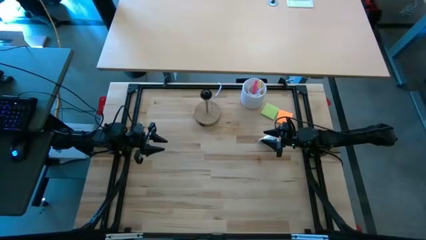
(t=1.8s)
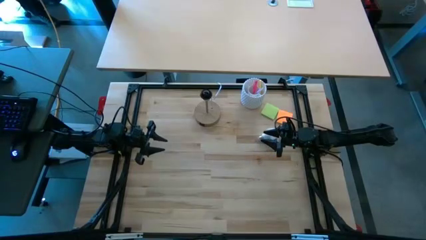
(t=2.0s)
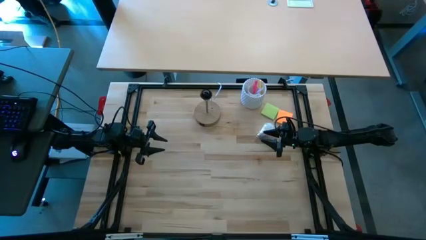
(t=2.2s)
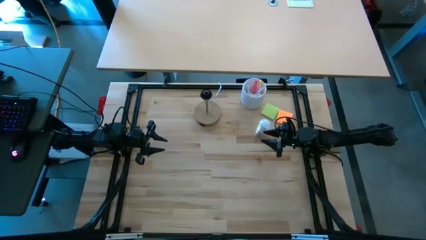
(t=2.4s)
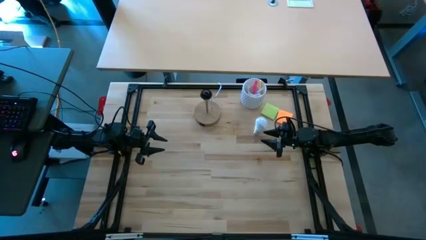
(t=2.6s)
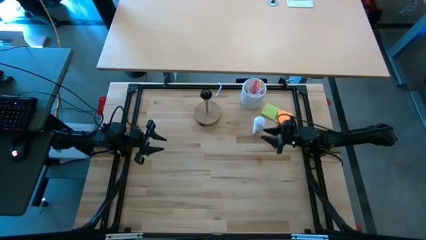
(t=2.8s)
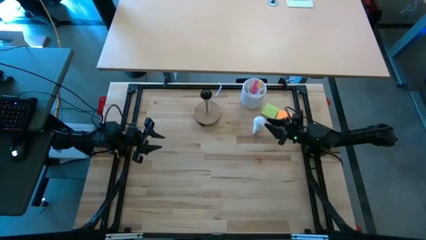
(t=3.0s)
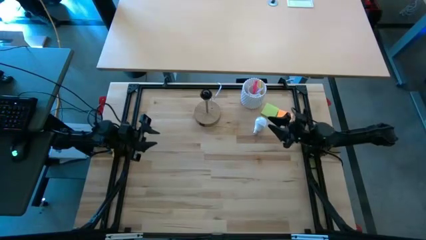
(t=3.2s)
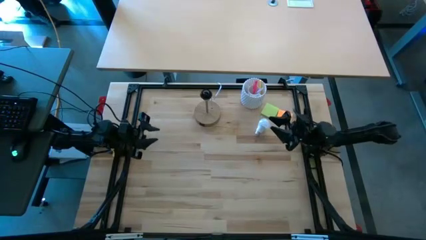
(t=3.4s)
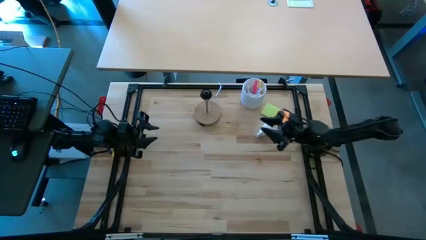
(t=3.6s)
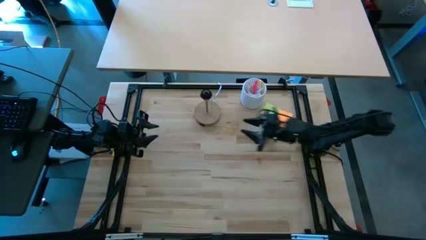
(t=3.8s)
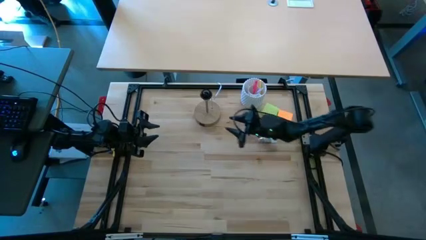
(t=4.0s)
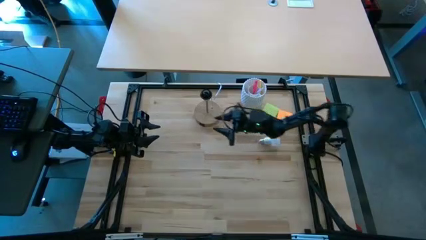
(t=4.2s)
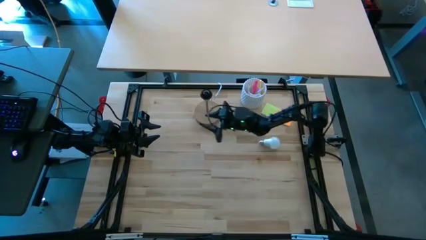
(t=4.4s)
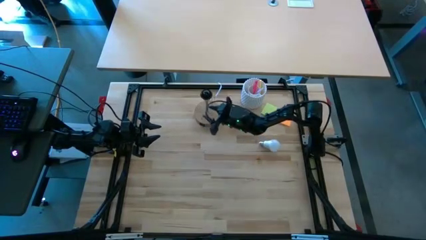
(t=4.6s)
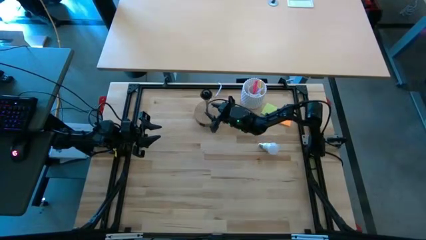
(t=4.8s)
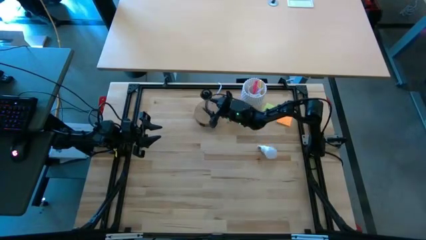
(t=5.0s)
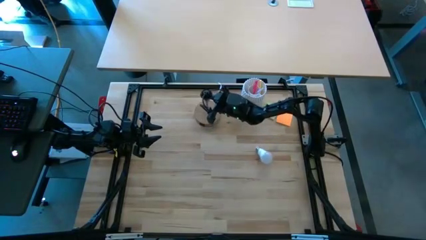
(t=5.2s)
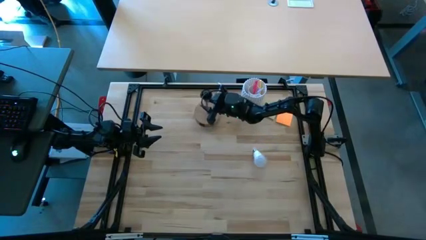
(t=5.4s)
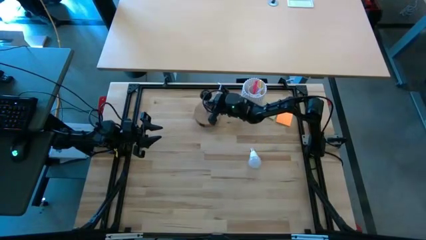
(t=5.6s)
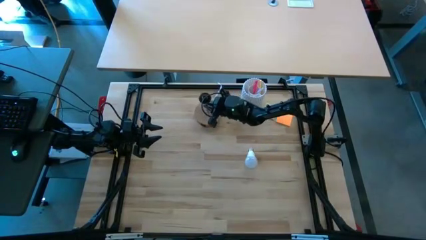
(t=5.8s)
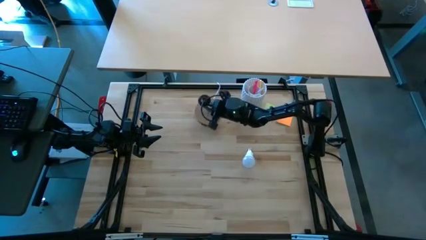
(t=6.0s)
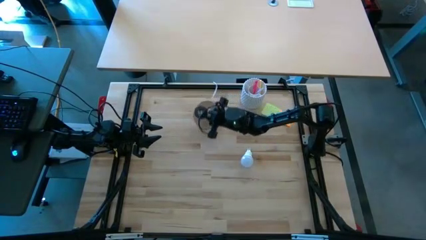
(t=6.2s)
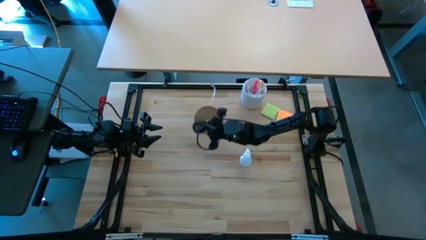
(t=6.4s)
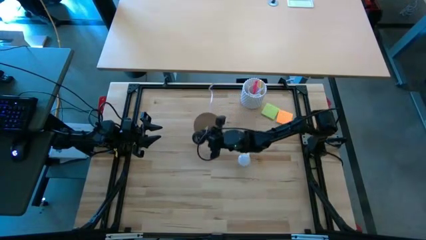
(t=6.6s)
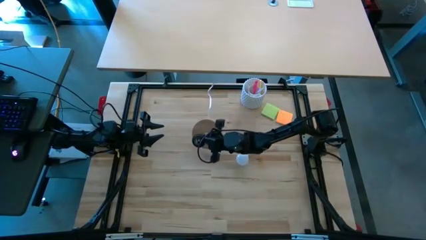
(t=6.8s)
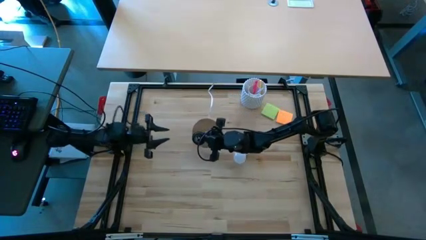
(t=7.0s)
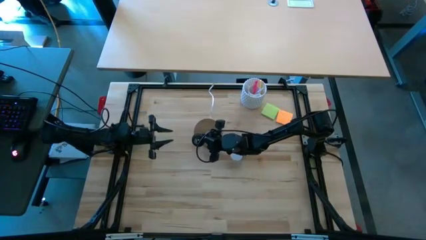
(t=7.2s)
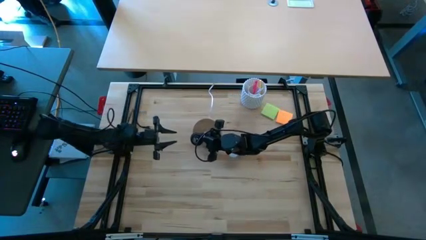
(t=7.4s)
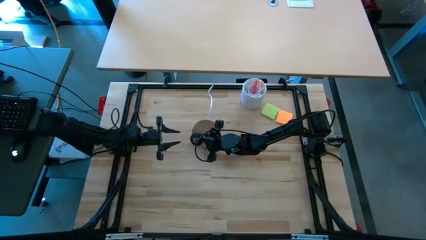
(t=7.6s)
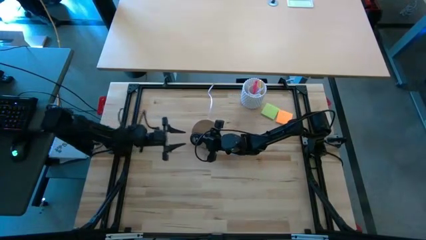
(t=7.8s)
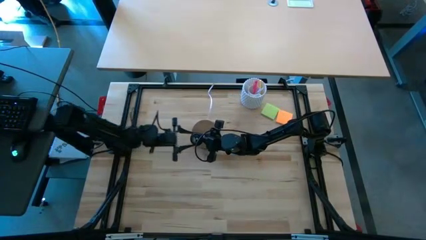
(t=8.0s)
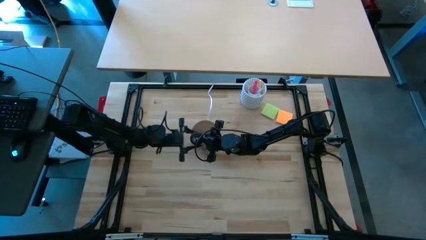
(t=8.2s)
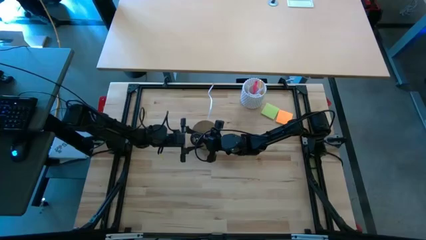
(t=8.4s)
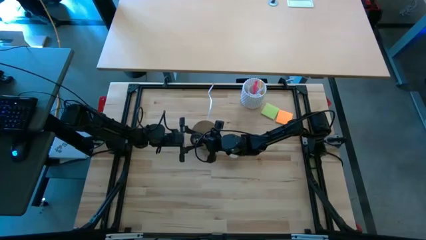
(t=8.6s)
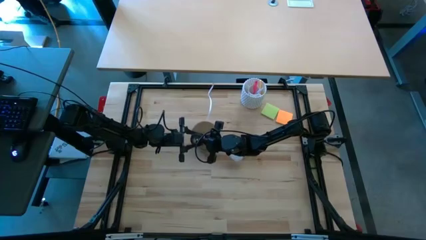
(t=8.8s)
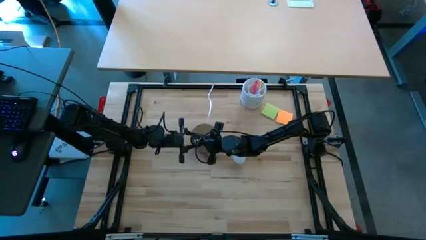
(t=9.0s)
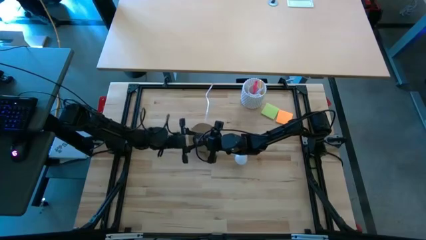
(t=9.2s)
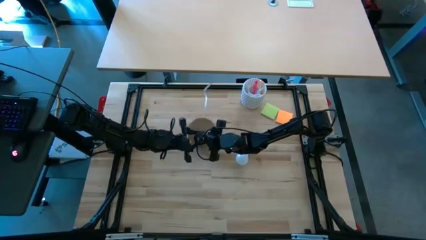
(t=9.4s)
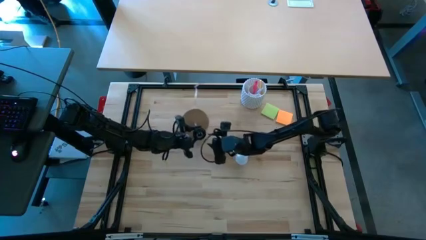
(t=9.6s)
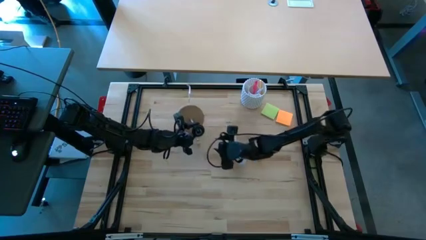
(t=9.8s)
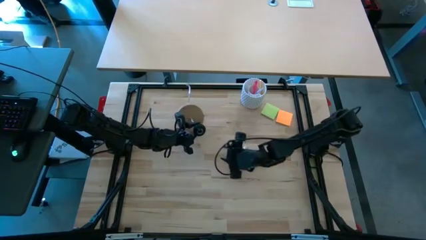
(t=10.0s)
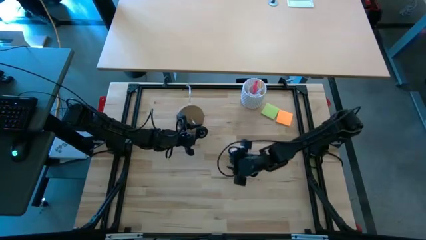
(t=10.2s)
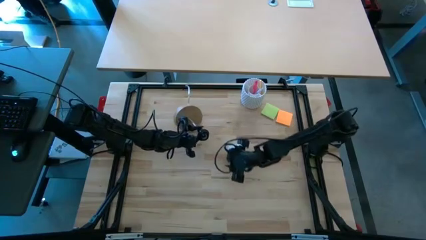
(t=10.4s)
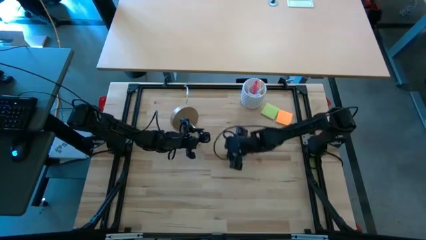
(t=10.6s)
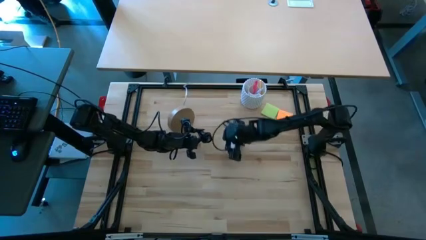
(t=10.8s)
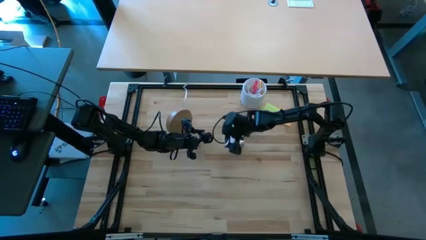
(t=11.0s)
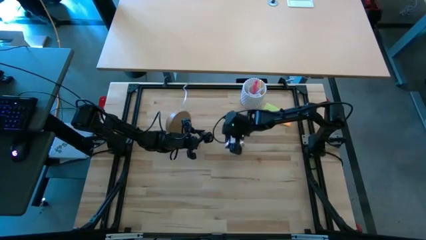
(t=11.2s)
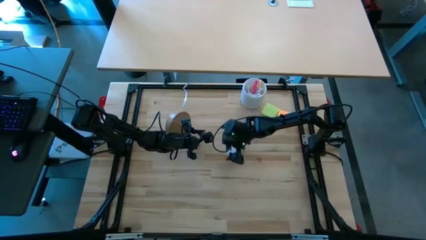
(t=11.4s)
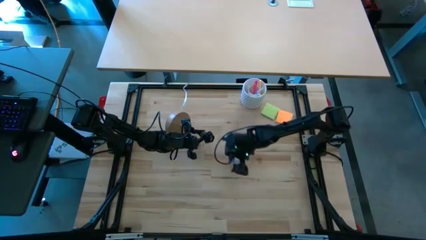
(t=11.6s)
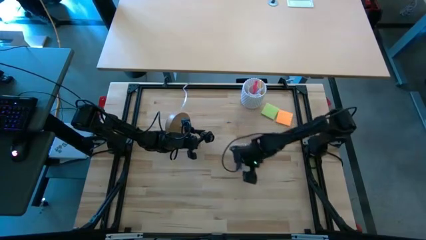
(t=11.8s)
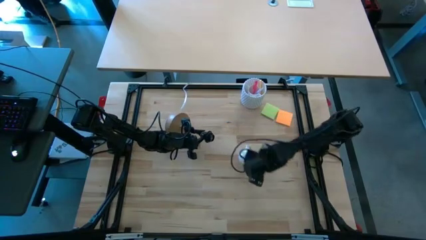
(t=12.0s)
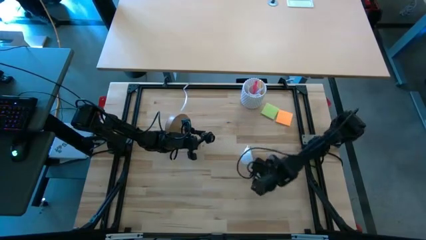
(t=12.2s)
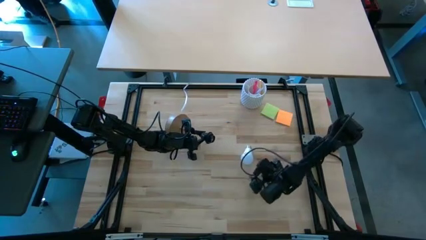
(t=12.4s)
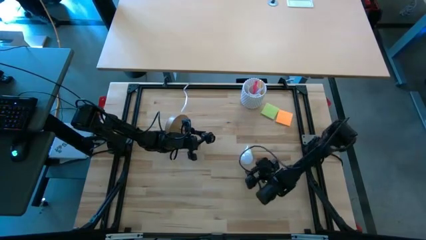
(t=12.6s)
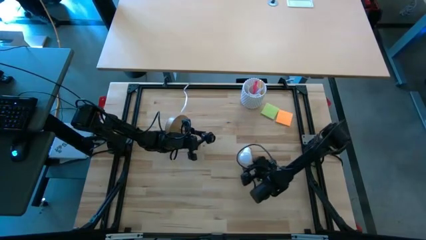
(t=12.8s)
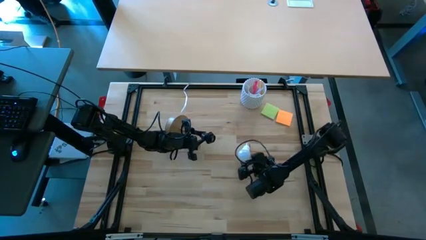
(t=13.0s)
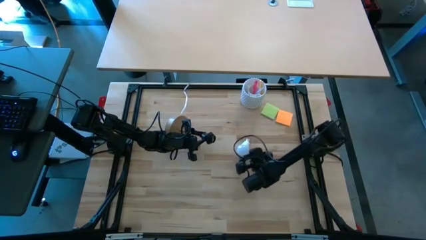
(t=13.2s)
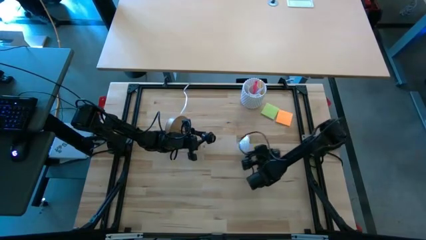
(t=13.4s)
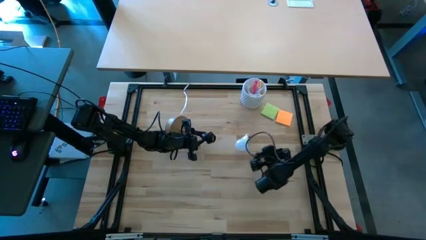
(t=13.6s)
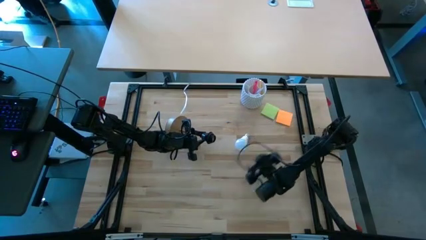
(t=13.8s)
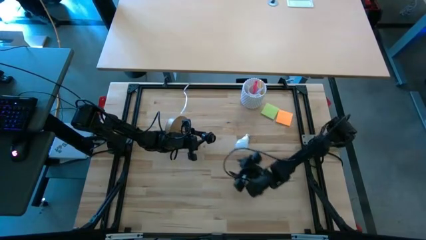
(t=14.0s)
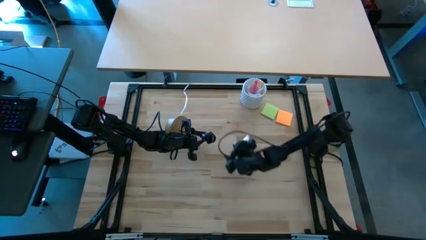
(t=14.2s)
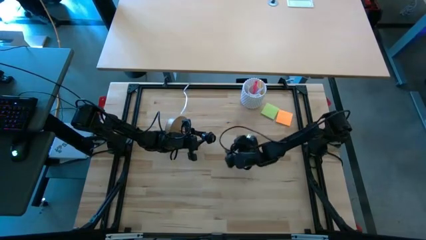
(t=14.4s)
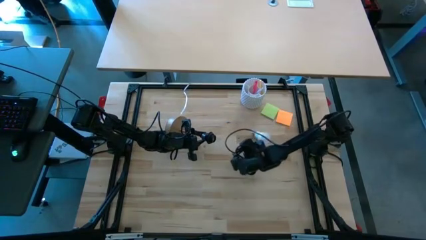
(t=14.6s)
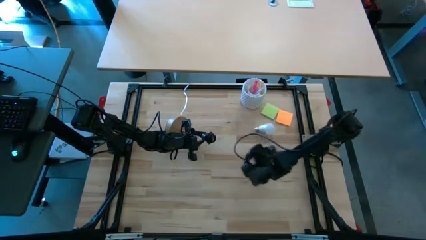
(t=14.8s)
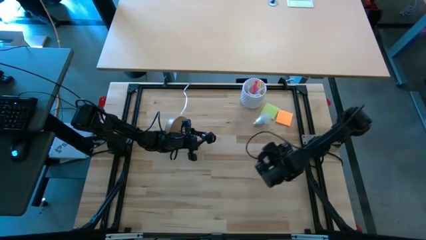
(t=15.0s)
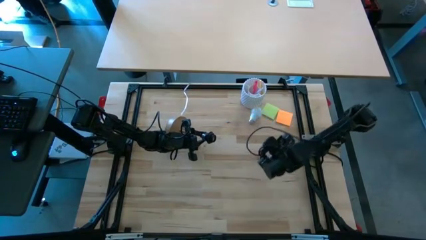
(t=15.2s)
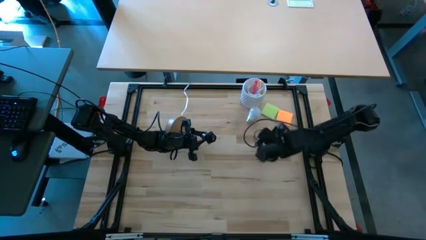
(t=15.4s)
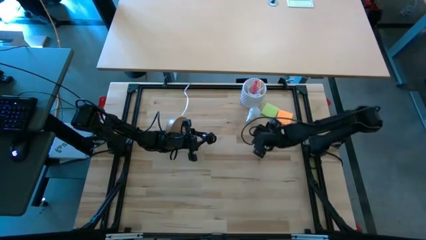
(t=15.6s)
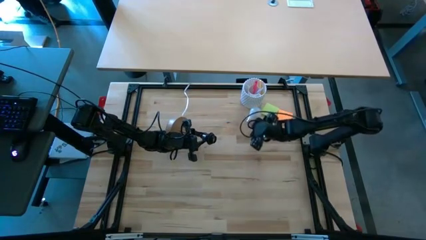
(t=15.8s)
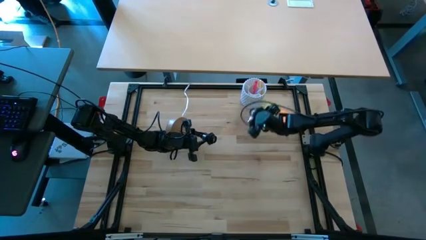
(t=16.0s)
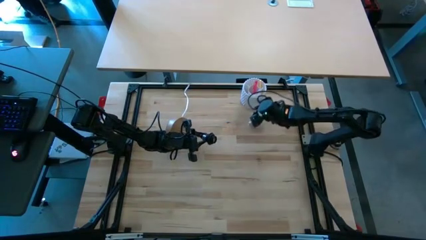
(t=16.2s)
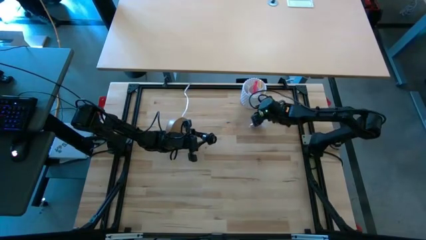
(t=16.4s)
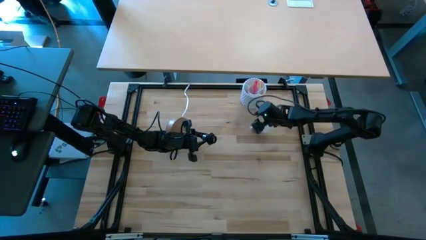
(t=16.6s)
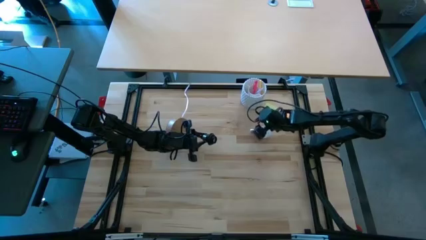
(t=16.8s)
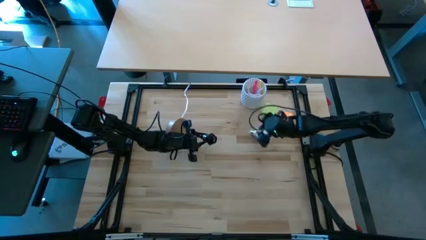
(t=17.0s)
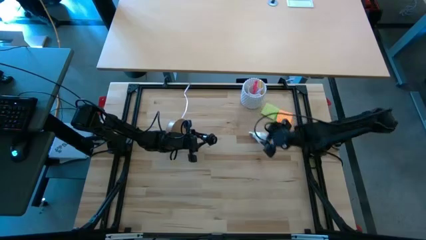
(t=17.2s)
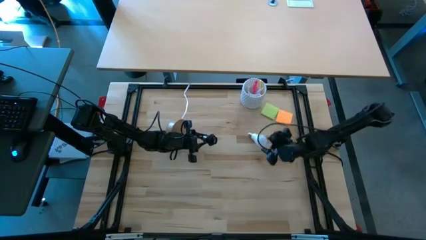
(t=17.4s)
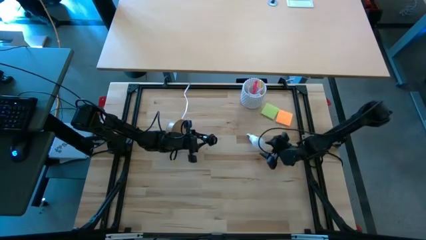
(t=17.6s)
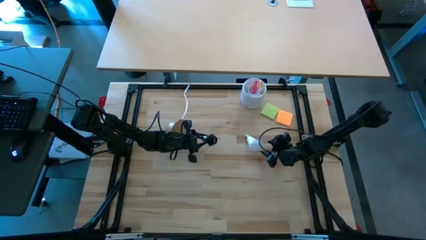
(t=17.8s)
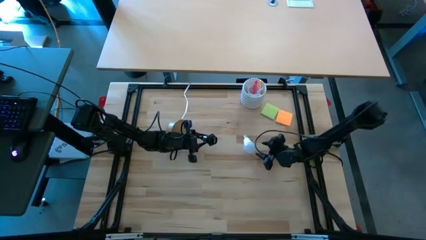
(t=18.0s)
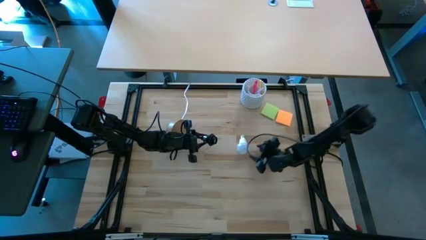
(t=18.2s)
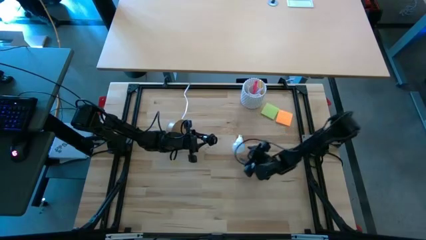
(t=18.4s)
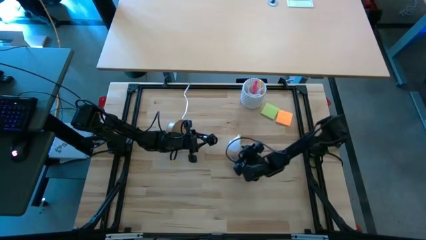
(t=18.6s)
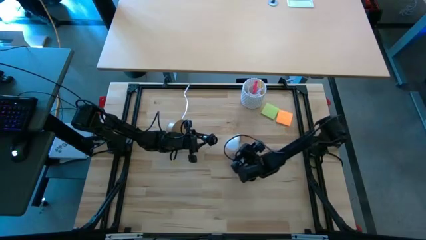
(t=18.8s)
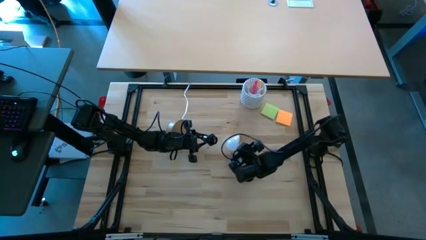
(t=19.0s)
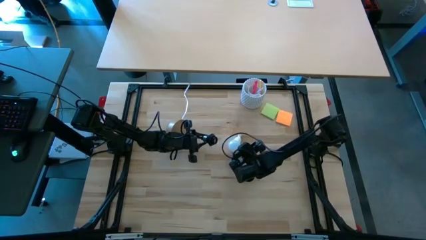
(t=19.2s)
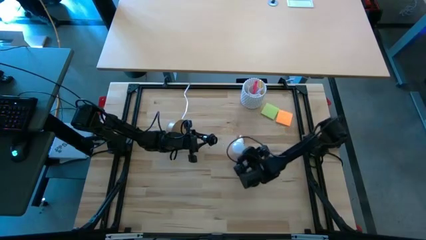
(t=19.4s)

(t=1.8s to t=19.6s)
Task: Screw lightbulb
Insert the white lightbulb into the desk lamp
